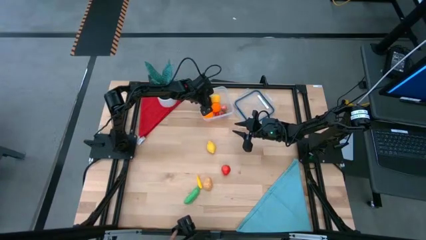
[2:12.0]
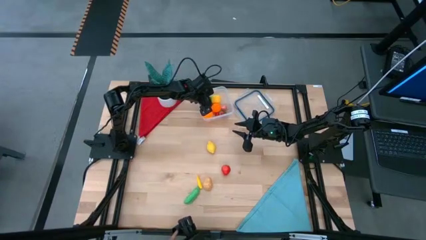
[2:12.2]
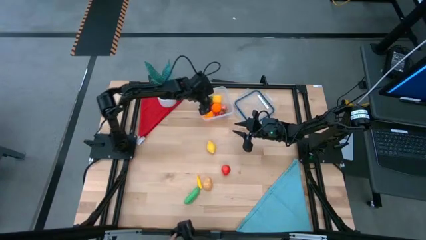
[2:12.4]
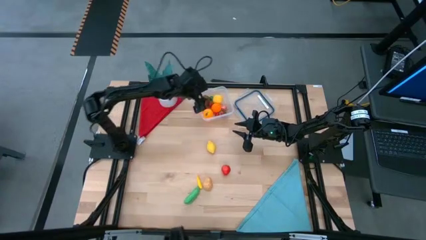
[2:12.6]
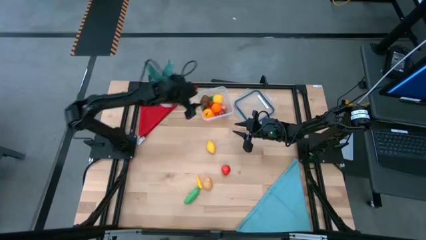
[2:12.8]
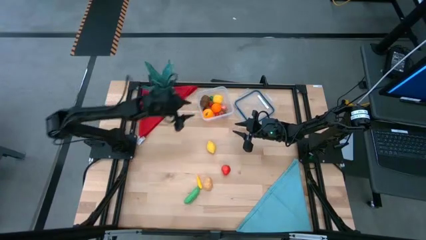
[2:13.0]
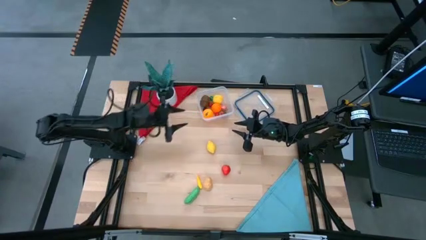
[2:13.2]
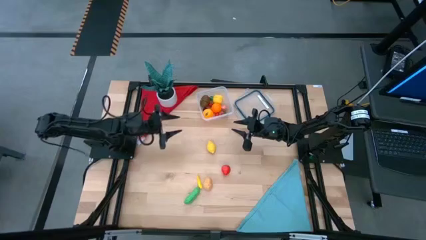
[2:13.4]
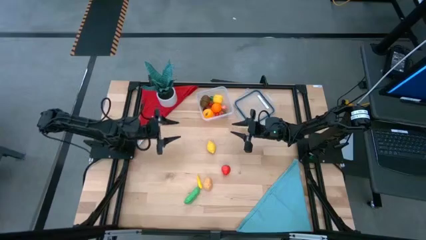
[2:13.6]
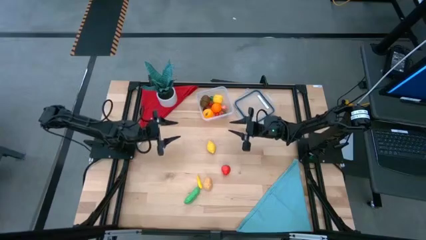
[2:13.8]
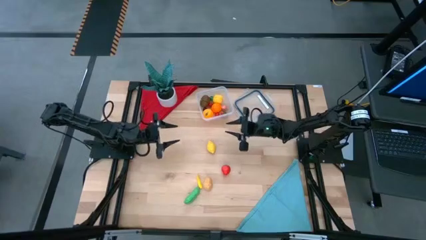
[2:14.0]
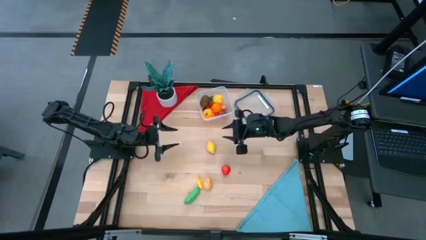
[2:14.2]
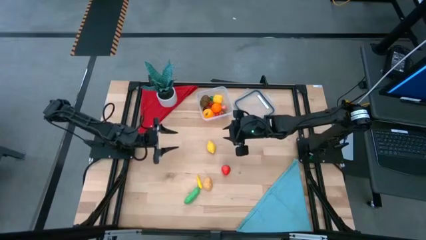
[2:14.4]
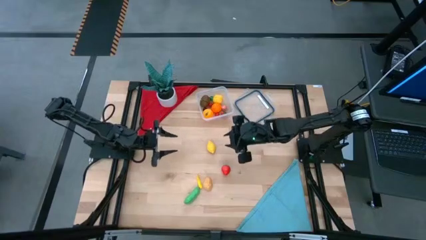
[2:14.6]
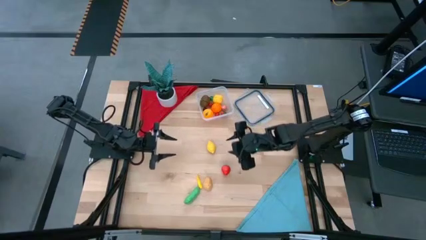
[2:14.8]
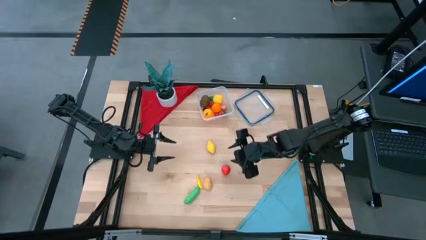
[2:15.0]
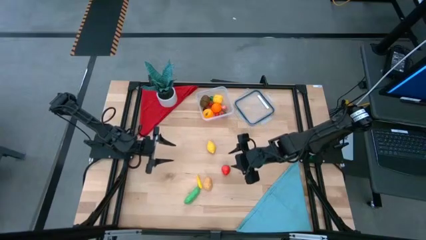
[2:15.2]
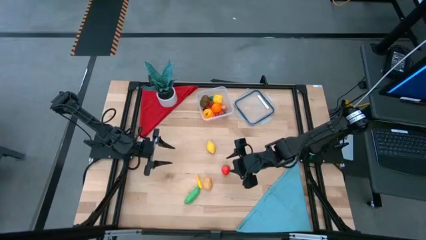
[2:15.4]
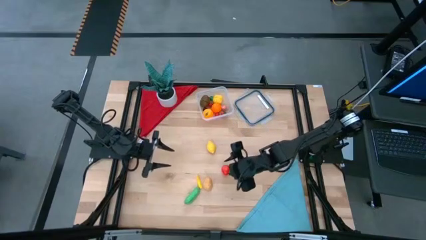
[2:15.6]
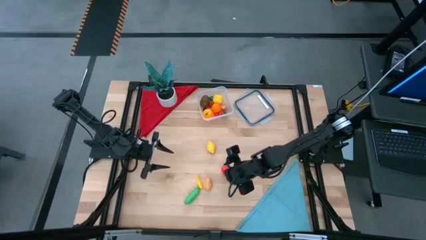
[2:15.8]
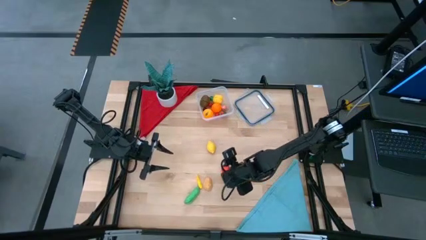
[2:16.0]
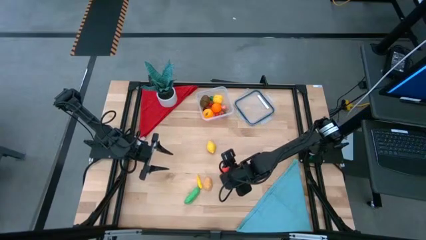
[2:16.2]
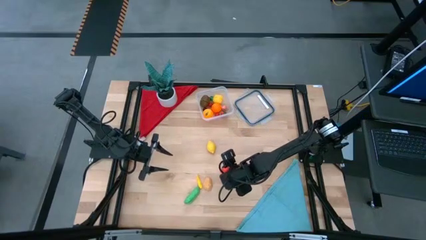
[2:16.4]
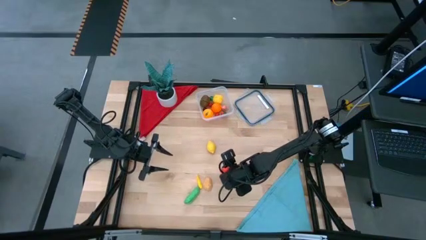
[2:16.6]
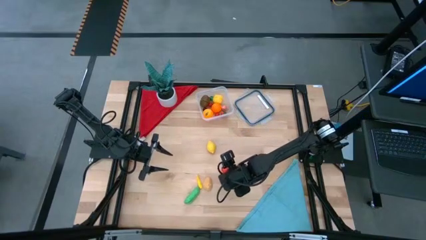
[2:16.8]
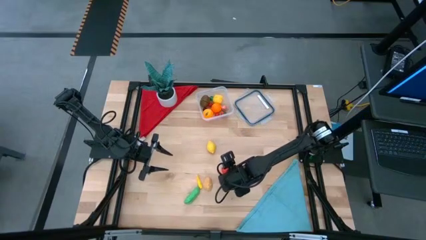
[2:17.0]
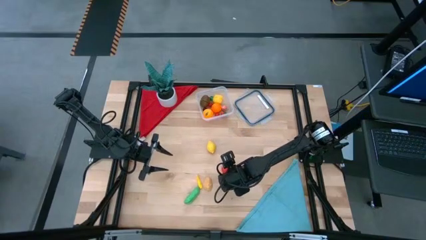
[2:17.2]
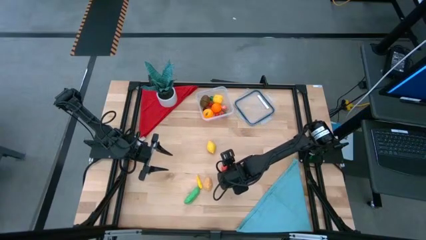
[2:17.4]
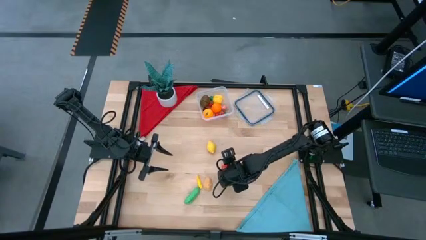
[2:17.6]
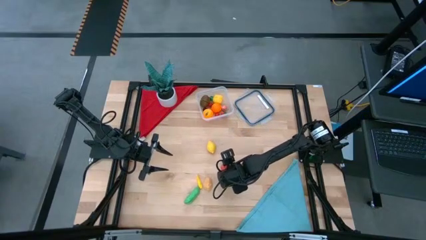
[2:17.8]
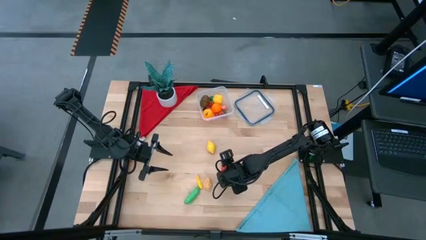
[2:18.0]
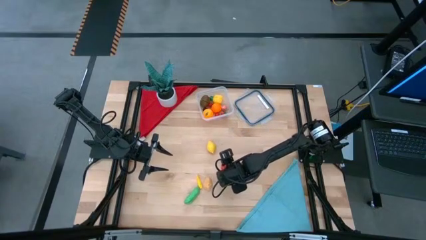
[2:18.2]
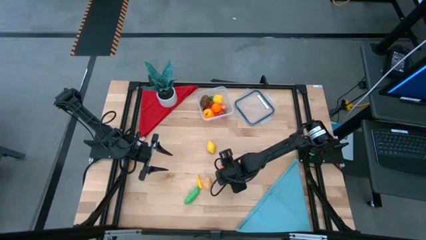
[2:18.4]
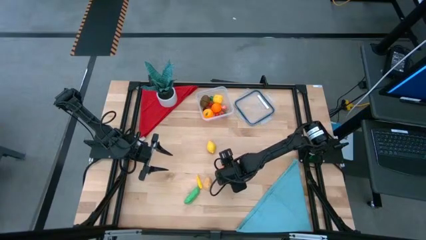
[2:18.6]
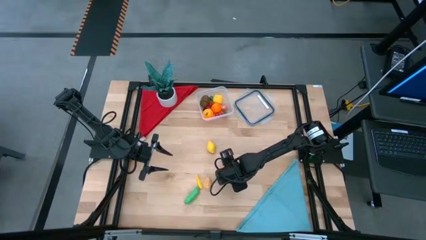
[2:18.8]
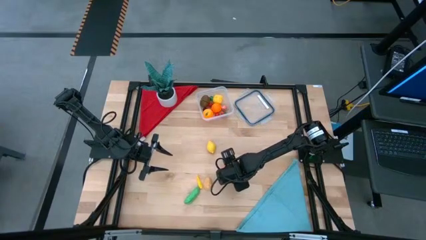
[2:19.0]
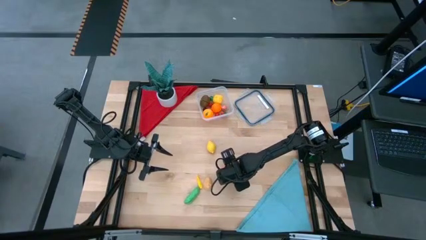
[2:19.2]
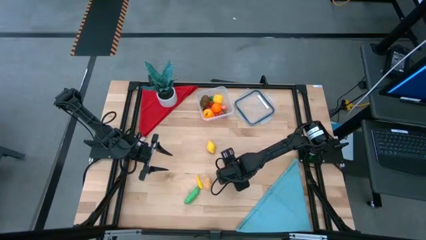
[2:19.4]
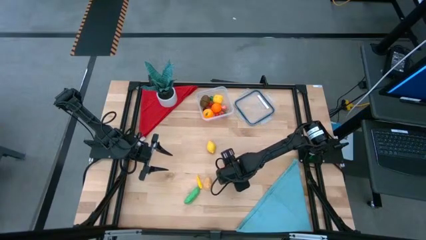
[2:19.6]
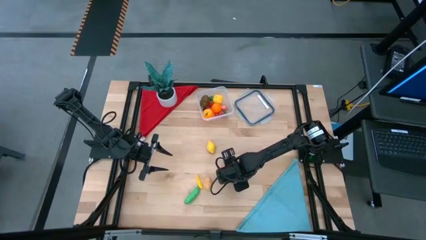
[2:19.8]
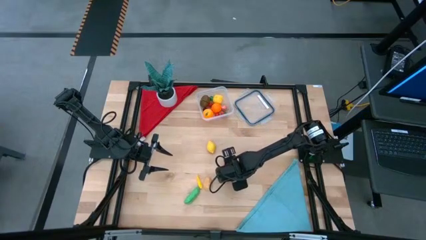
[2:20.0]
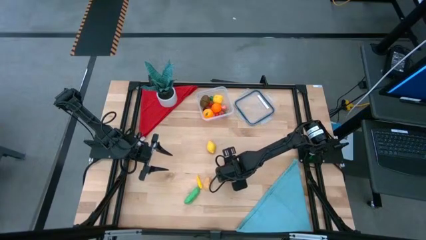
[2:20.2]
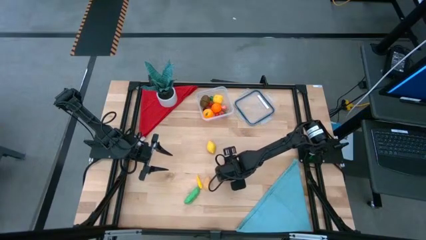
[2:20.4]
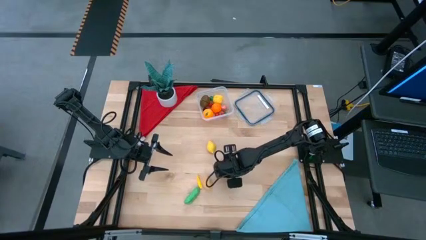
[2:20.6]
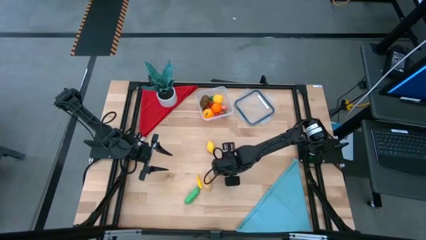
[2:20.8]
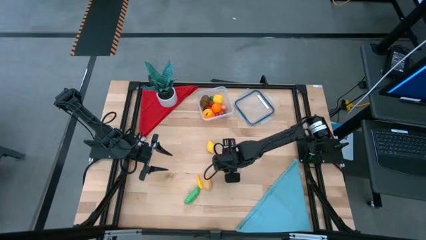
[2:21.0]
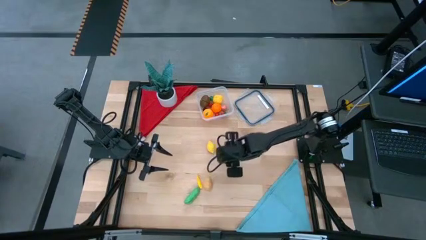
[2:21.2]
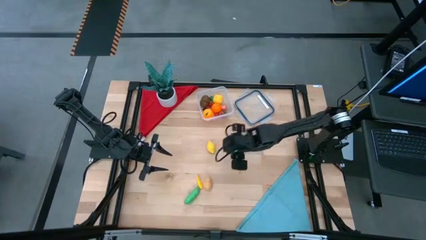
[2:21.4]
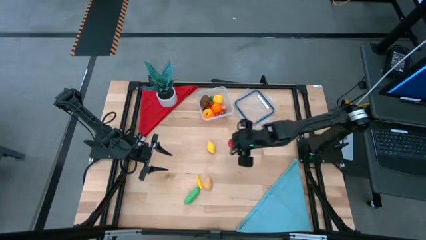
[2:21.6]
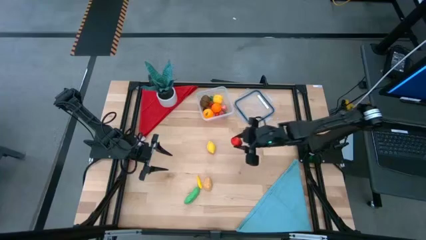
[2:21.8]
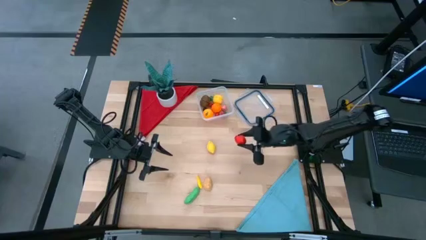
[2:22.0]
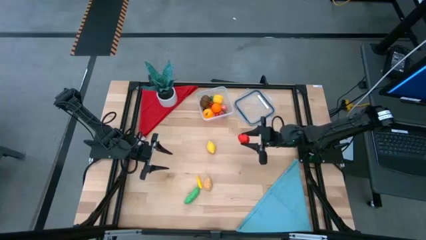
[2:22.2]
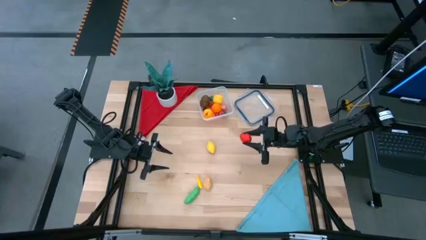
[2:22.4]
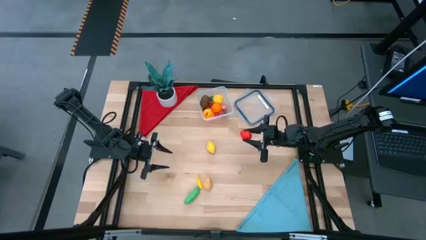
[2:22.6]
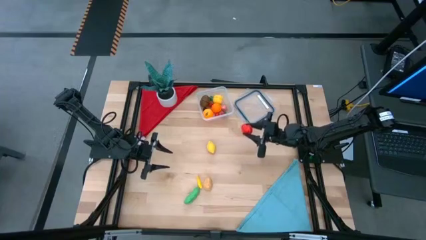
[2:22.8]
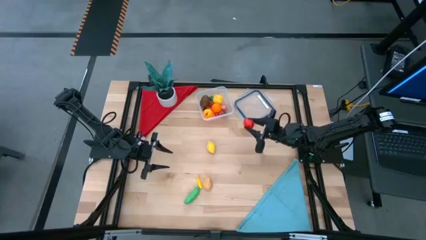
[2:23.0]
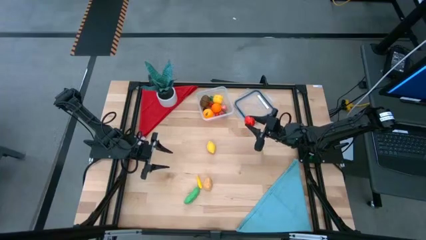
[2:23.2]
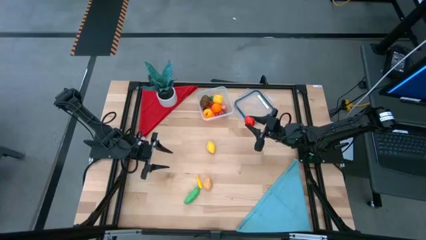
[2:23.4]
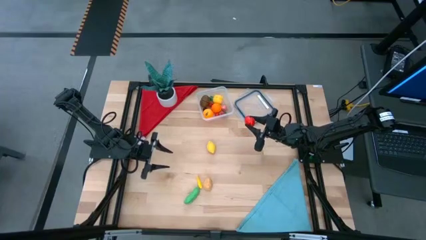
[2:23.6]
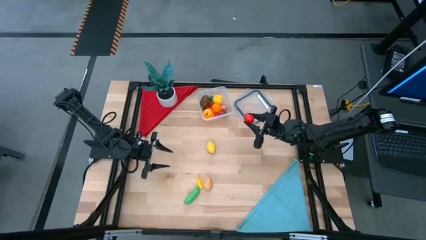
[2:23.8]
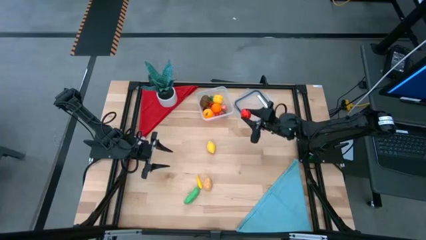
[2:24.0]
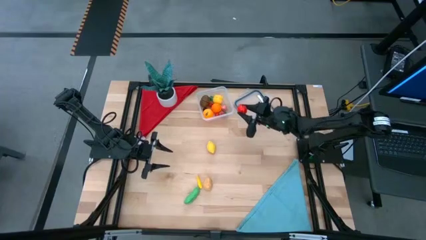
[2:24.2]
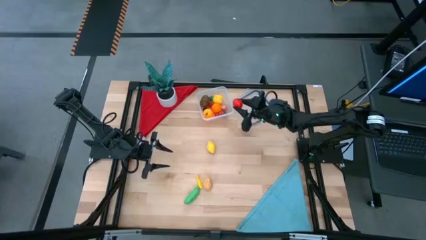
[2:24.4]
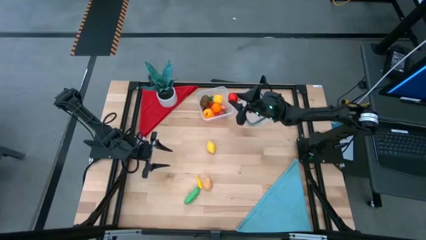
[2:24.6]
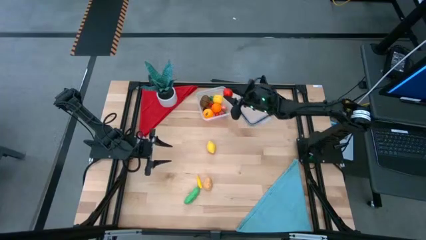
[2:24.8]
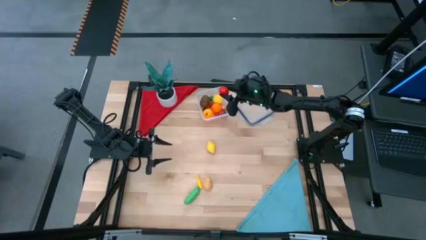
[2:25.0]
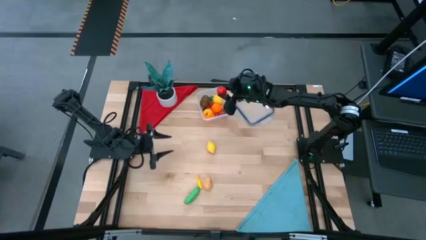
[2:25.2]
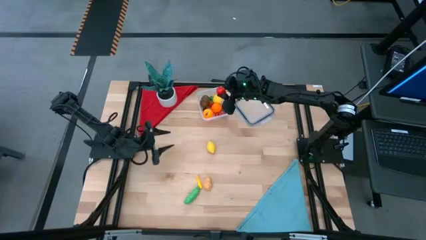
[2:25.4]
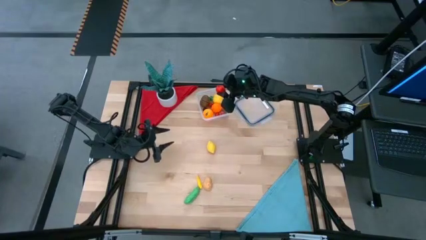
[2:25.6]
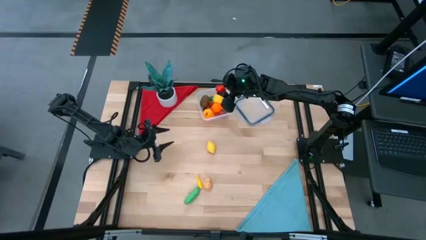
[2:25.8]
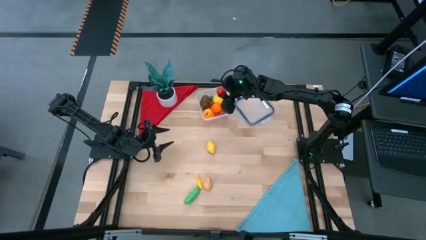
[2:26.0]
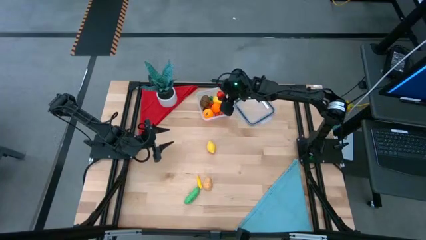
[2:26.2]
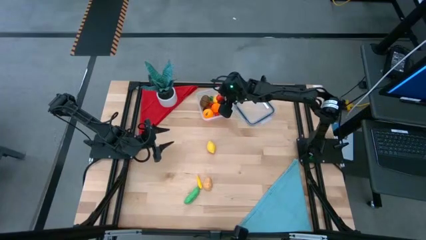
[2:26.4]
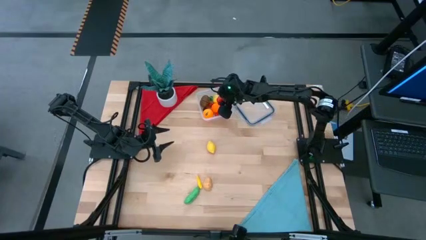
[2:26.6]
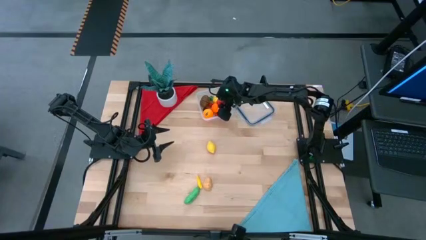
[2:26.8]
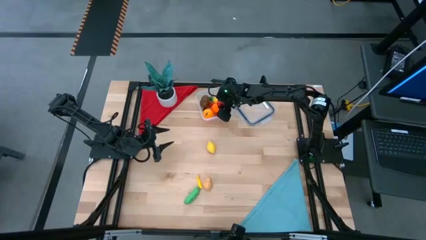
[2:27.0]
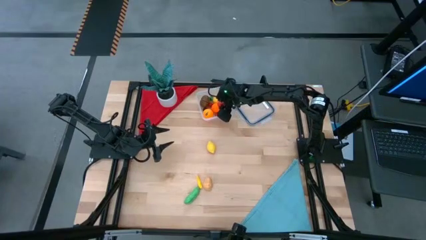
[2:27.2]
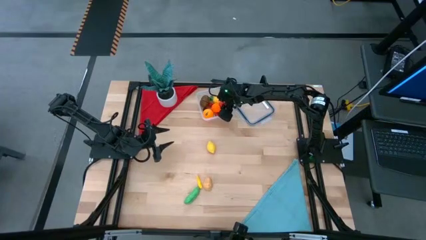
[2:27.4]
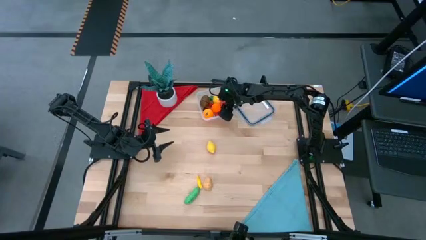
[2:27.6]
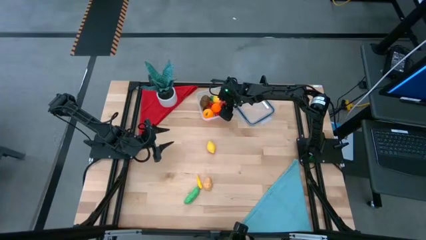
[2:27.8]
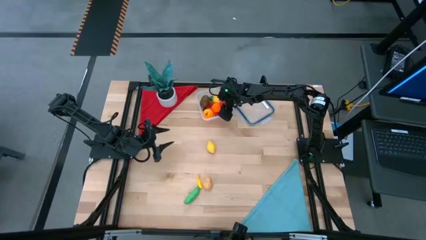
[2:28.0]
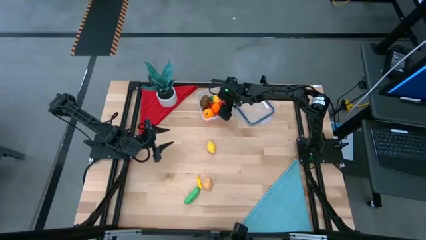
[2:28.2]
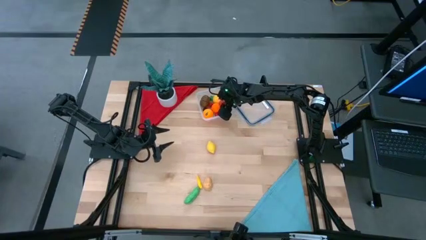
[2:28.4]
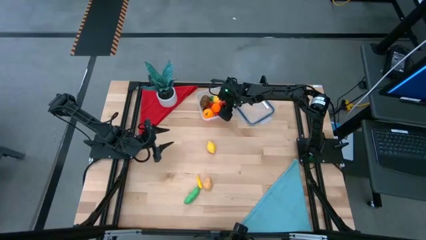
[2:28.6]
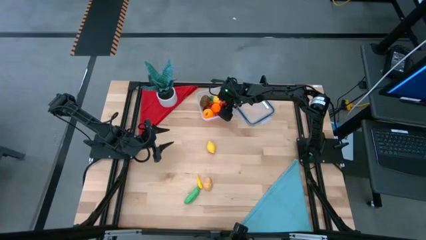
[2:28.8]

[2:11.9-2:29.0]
Task: Pick and placing Produce into tupperware
Put the red strawberry into the transparent container

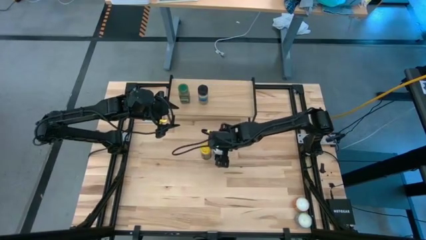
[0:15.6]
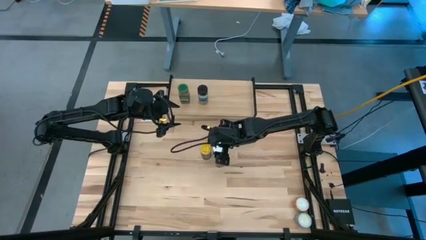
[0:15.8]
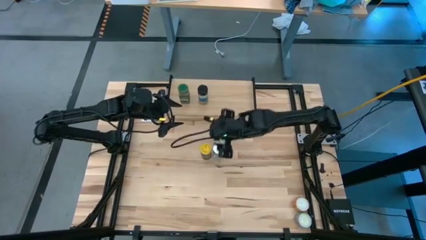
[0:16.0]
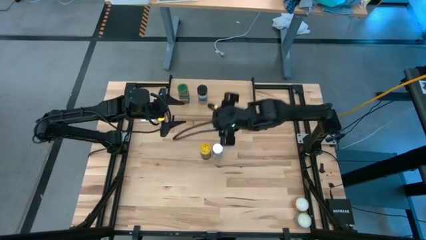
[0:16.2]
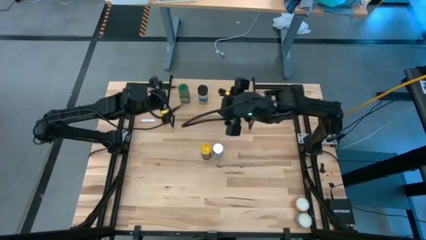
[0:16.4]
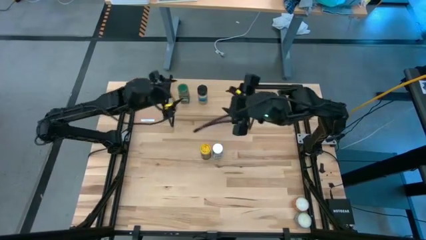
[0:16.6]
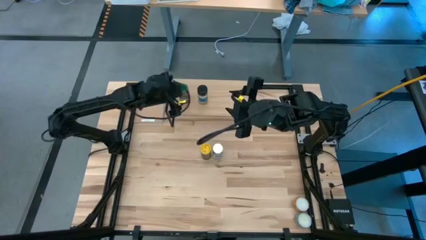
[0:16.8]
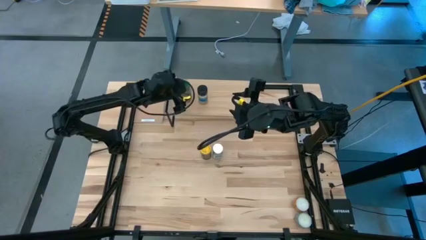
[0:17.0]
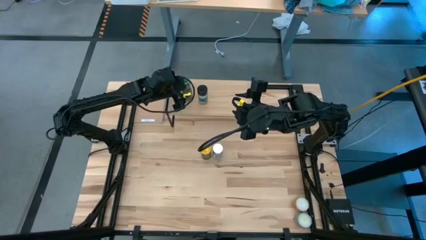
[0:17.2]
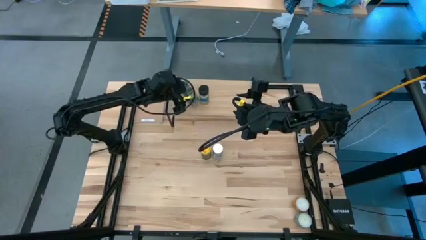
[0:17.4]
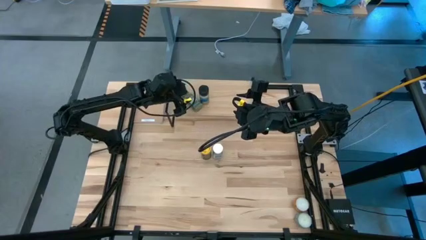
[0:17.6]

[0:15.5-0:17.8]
Task: Shelf spices
Remove the green seasoning bottle from the shelf
